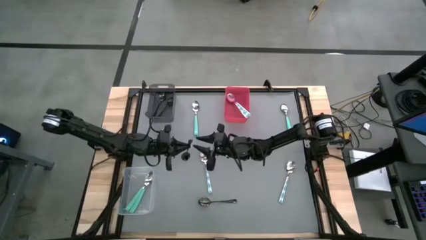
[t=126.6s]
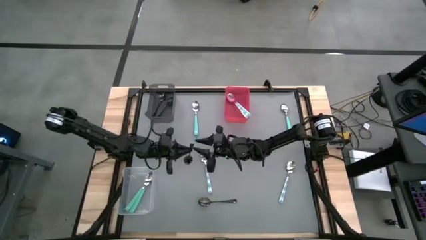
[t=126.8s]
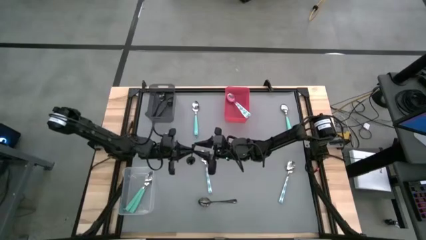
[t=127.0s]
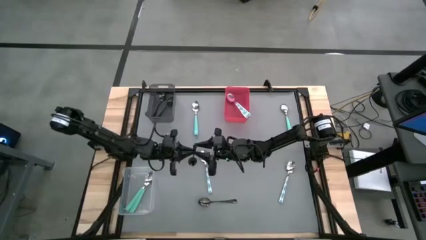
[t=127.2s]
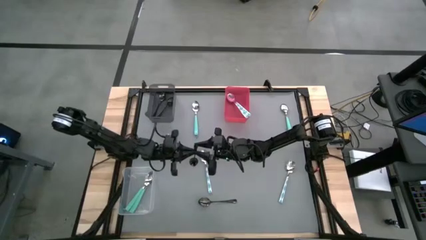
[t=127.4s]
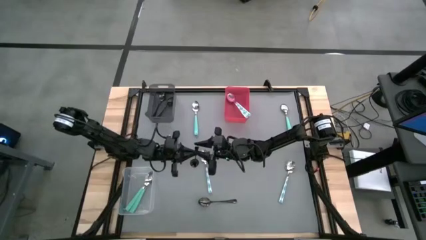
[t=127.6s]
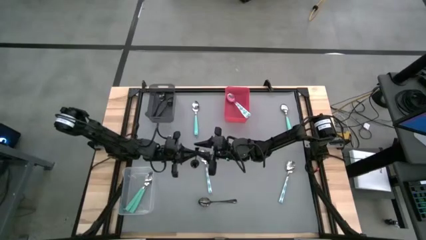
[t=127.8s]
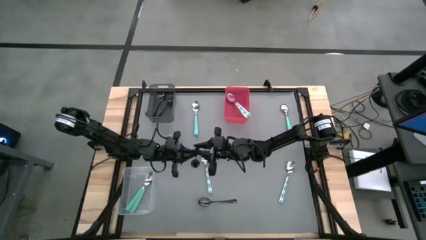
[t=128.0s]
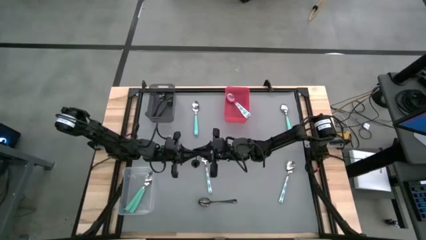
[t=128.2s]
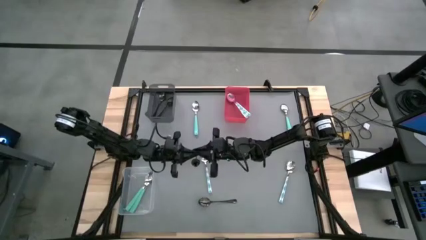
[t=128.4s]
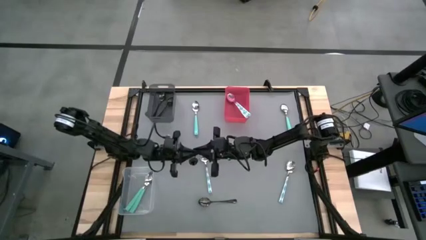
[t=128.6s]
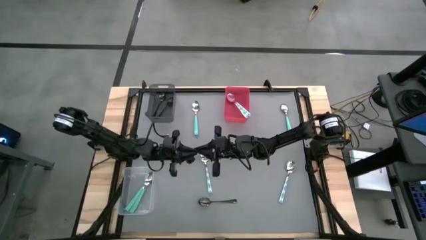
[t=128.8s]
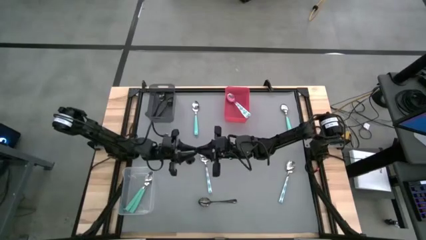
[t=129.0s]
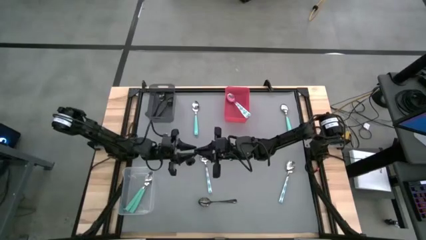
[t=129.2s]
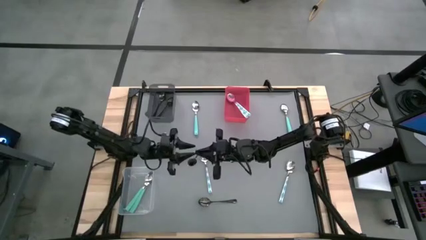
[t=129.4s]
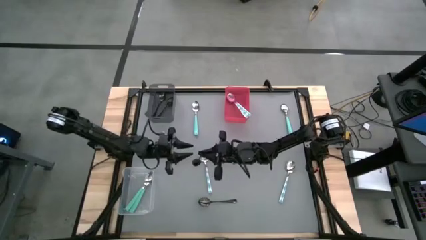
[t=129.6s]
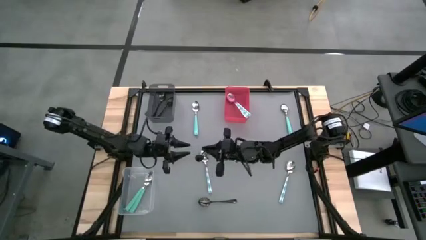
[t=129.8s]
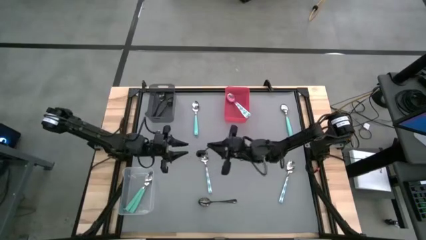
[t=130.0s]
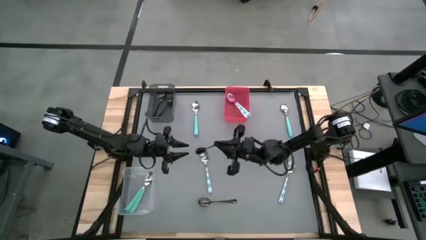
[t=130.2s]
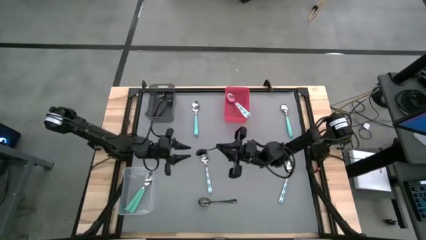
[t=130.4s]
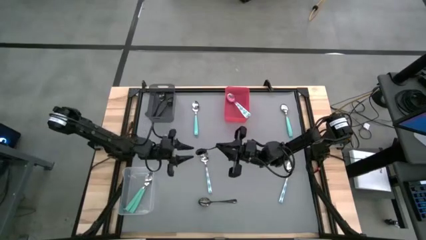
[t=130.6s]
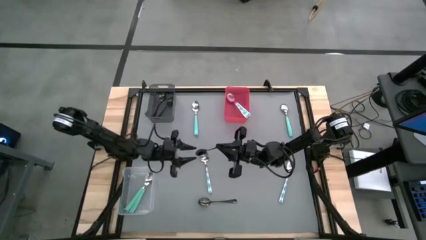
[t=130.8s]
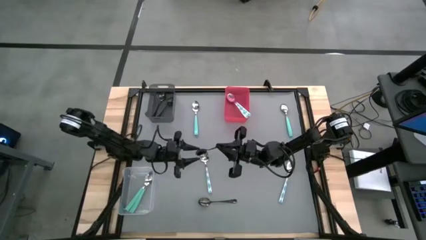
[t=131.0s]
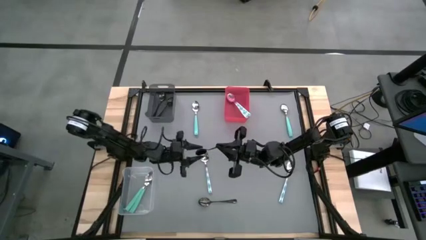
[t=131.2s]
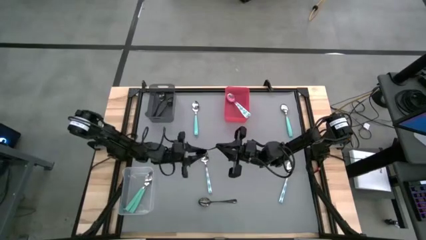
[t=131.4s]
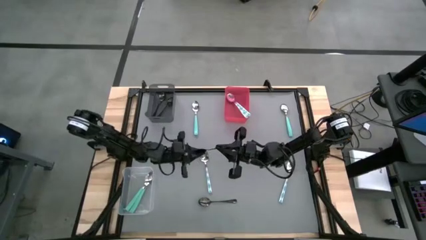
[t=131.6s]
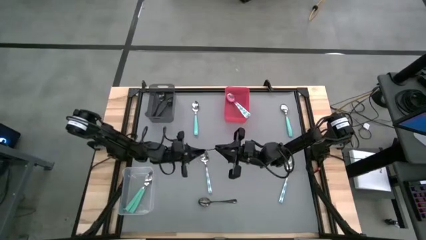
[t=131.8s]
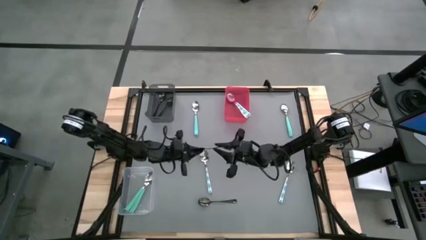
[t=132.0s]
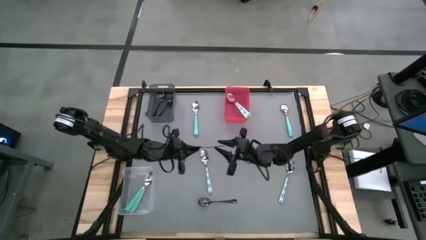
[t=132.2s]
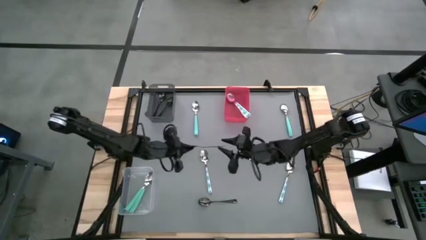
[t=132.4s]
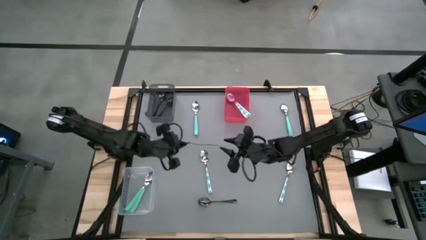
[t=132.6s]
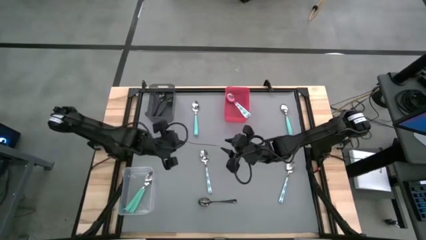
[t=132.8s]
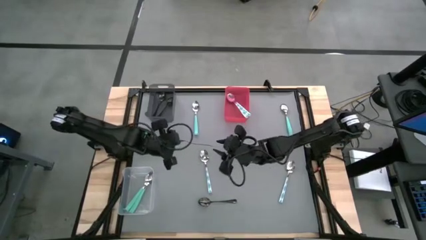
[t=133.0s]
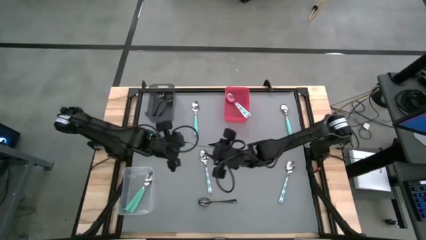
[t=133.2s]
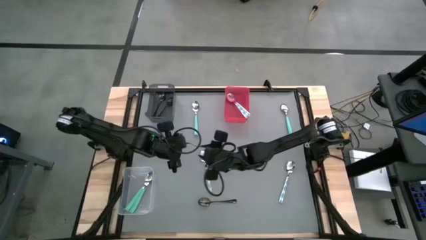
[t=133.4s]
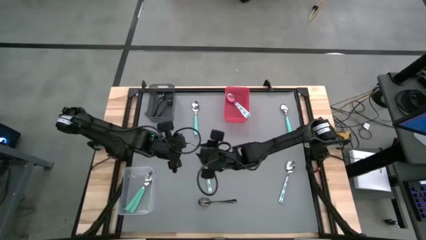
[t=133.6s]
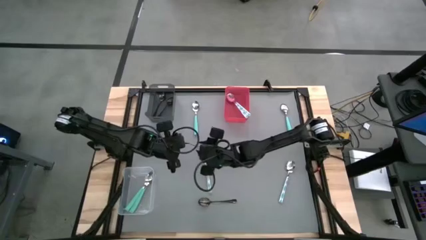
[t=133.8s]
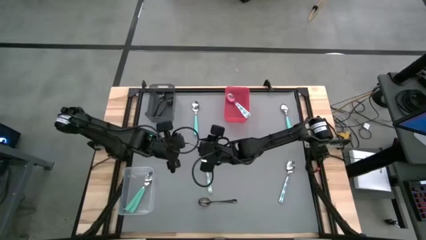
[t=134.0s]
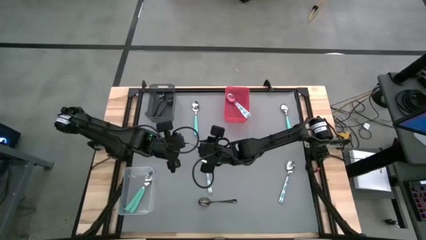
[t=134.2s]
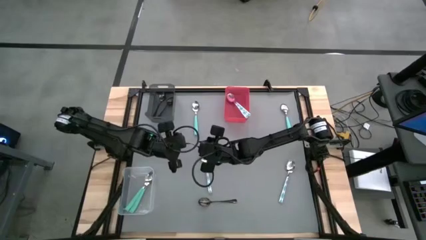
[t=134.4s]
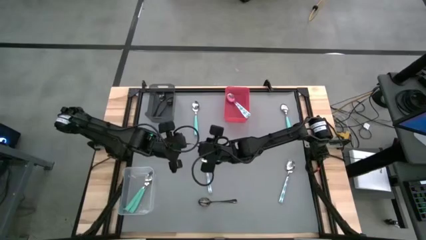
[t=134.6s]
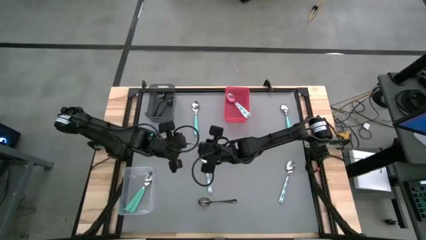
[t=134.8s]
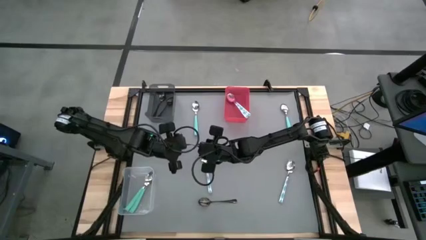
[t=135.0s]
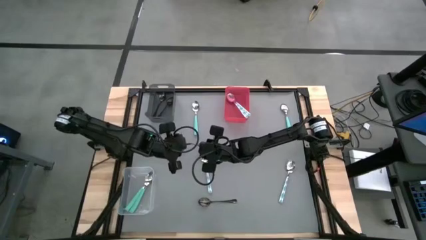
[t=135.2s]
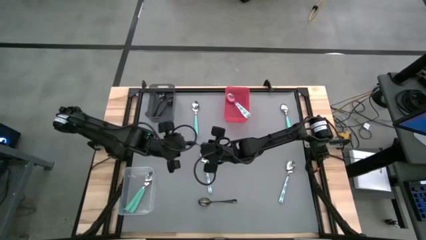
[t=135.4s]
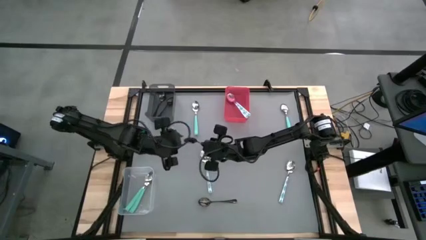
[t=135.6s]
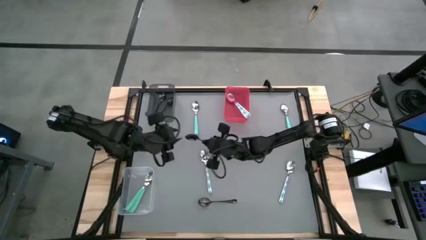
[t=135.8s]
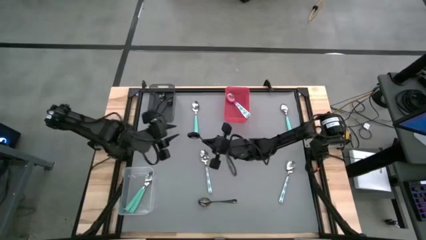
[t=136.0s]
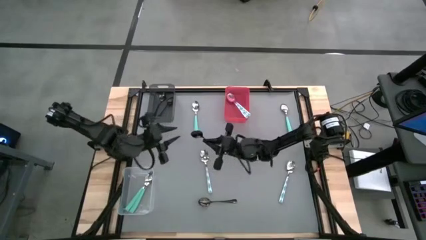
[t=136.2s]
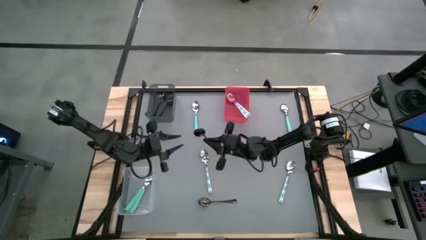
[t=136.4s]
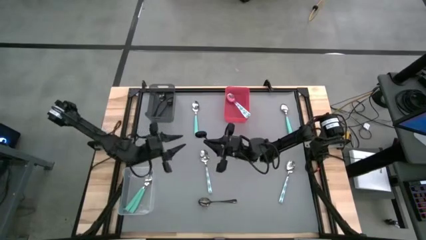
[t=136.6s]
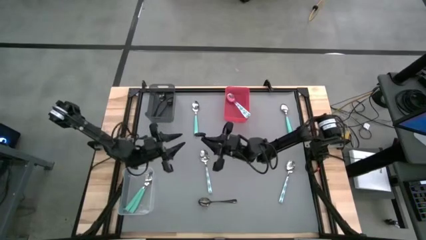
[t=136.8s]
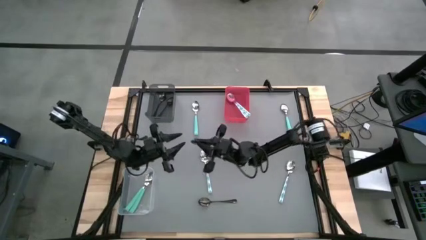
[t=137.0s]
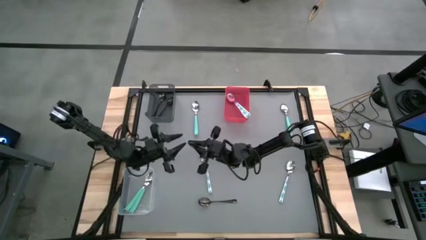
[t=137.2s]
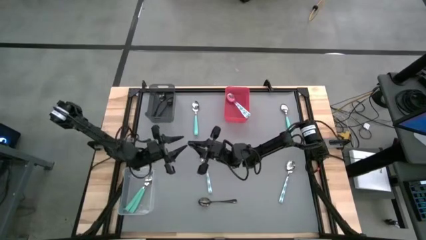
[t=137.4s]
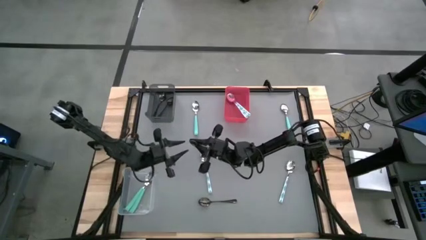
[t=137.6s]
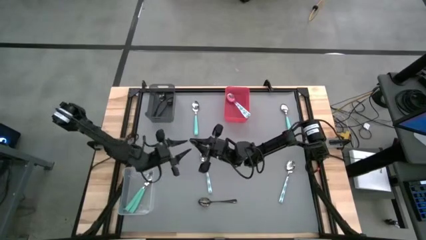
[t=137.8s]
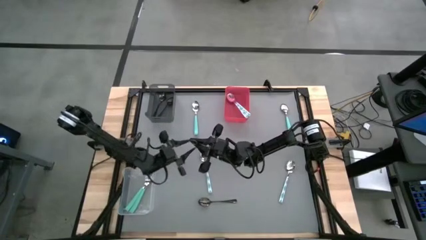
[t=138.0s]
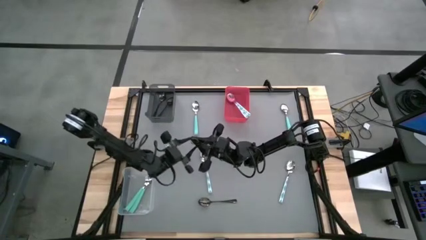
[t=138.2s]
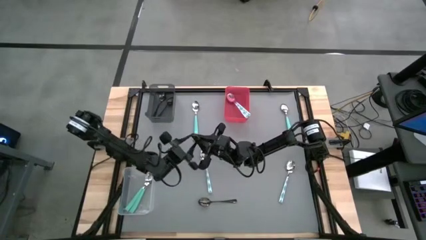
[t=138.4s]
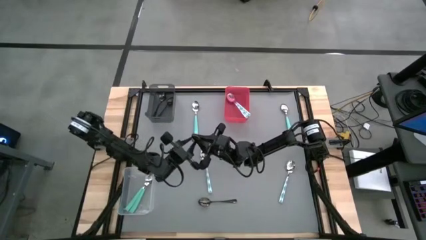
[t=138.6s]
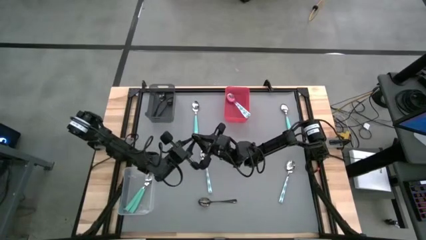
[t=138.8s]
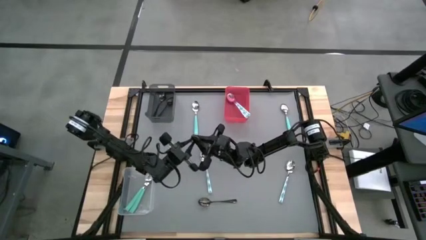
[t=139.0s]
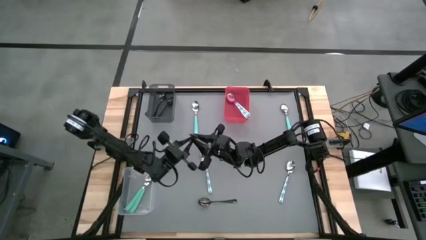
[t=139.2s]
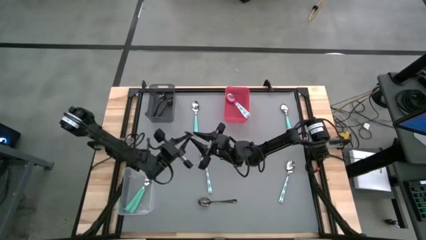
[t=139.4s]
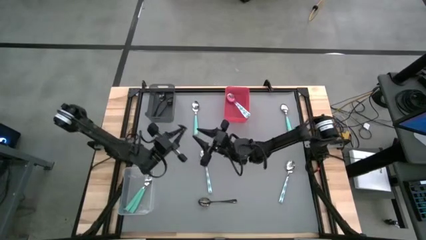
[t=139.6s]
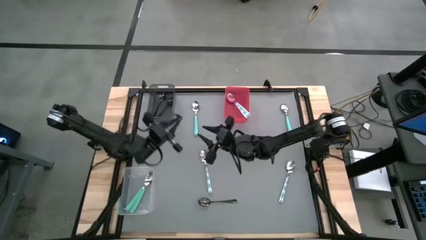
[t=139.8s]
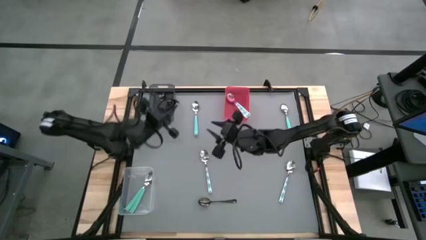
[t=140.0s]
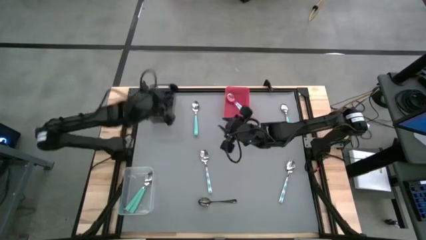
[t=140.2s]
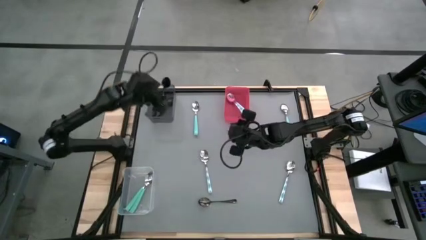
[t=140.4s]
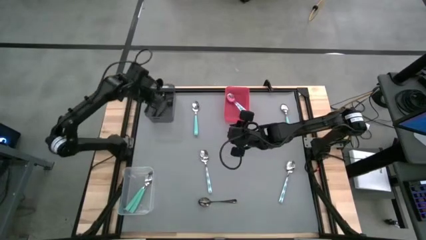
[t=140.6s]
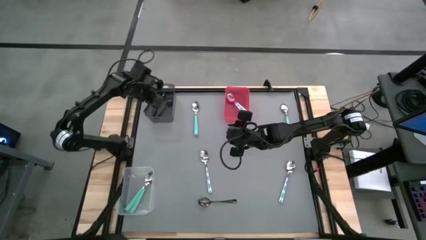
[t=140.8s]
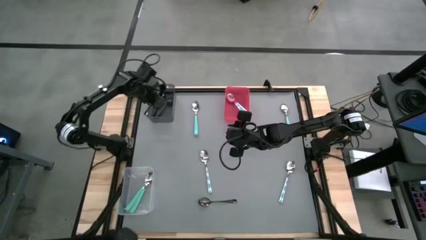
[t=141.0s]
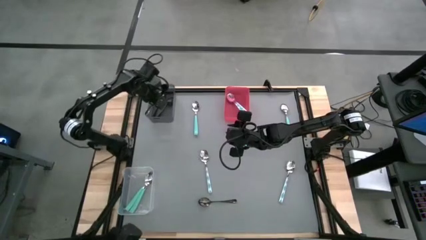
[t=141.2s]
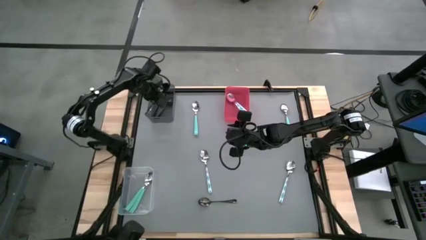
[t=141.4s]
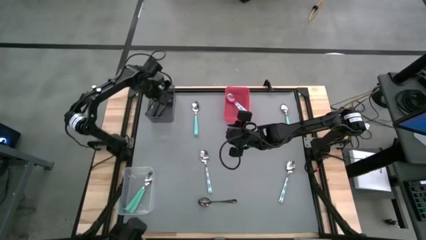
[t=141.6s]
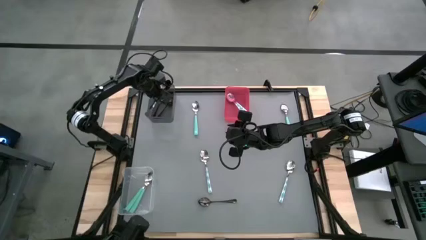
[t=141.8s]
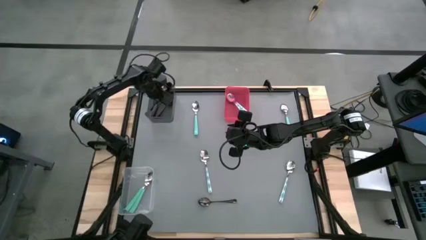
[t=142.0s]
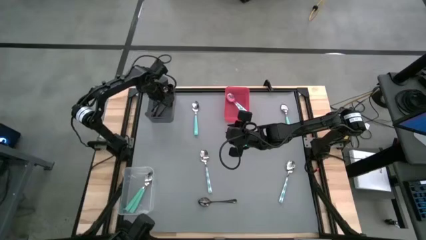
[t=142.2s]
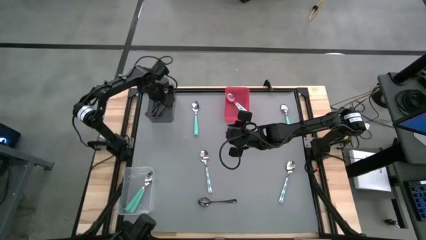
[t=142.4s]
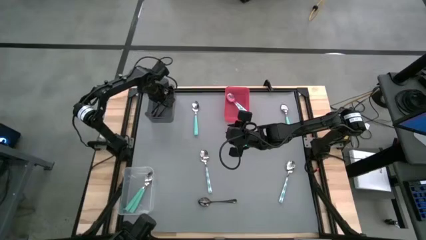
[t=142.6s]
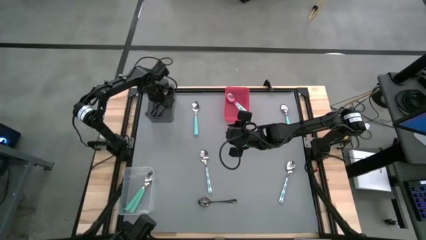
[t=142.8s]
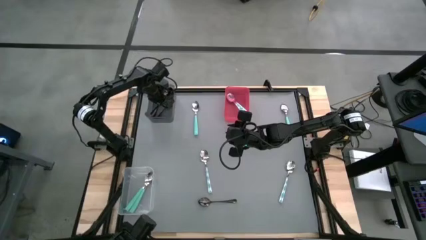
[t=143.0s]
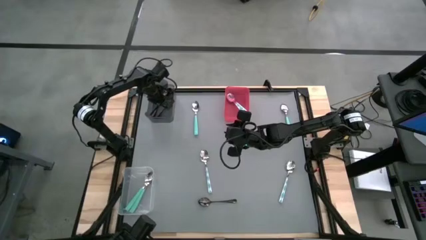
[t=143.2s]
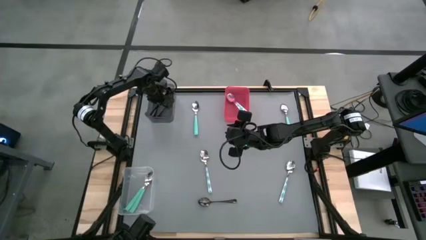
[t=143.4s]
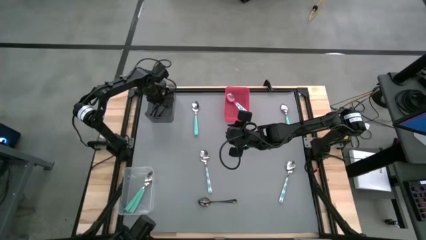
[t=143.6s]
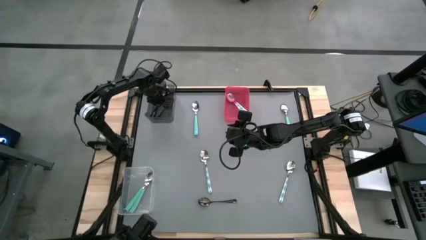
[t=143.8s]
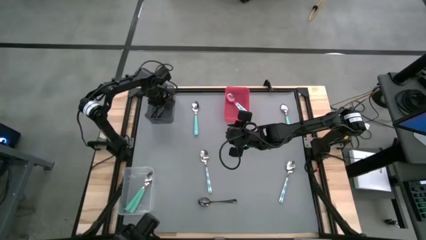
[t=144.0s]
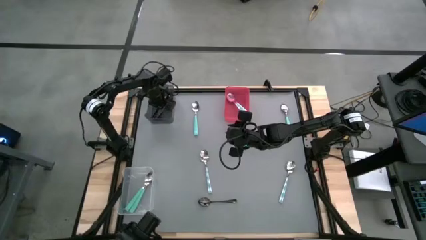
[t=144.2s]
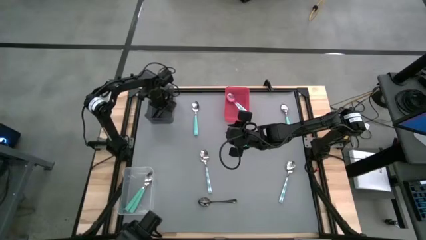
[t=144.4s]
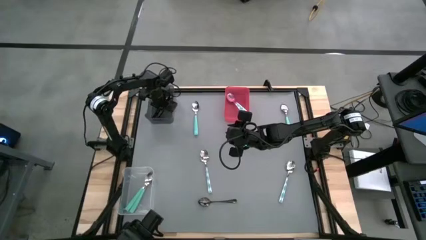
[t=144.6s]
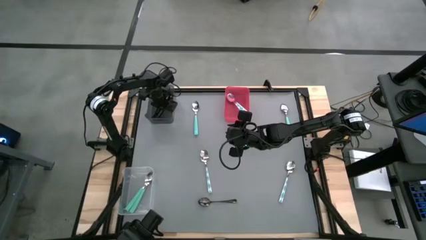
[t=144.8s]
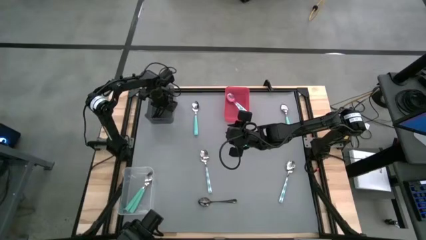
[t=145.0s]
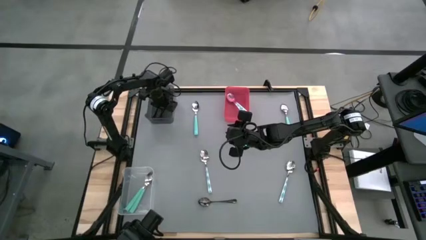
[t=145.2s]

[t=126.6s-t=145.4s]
Task: Sort silverware by color (type)
Put the black spoon into the black bin
